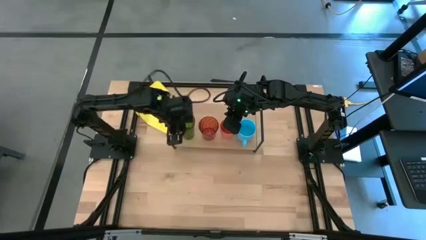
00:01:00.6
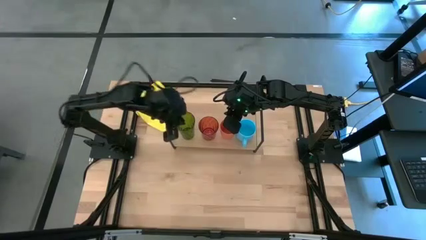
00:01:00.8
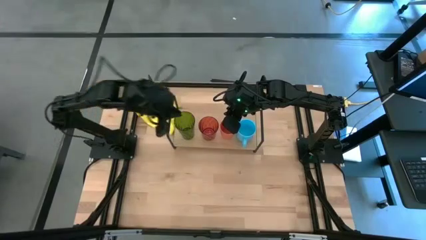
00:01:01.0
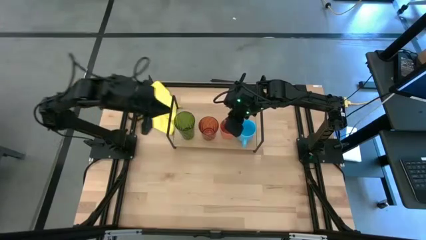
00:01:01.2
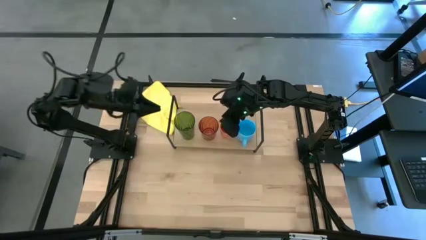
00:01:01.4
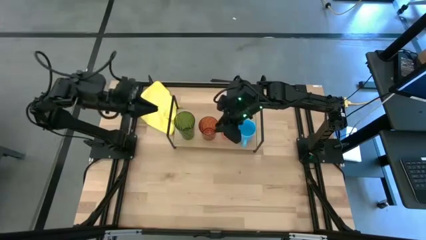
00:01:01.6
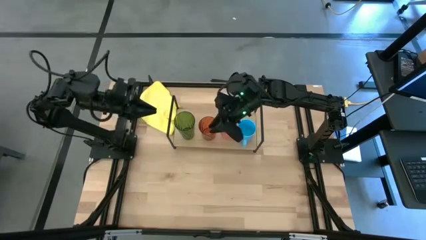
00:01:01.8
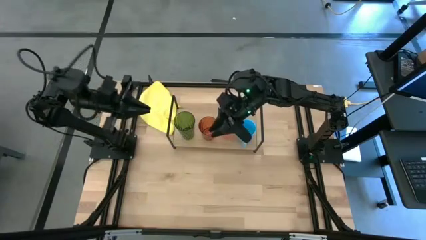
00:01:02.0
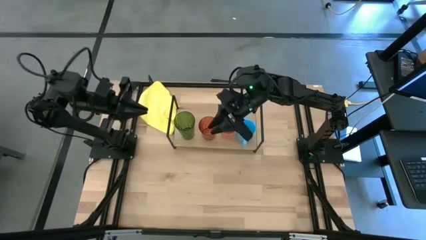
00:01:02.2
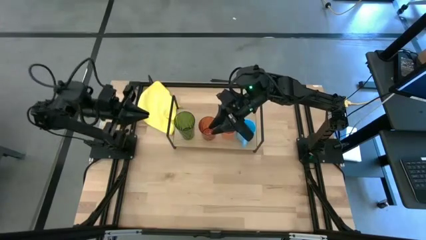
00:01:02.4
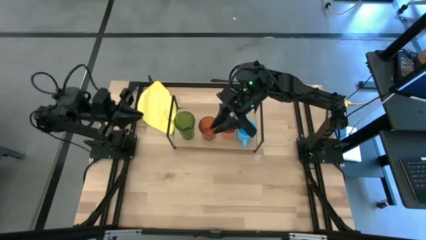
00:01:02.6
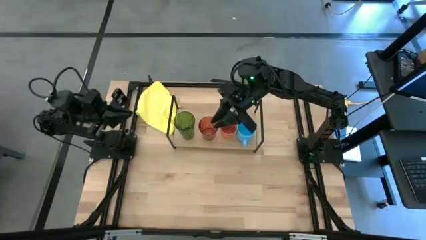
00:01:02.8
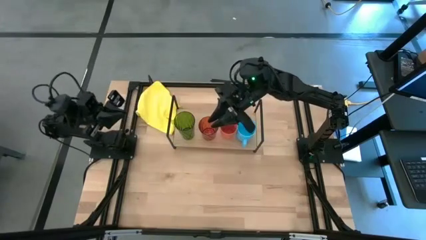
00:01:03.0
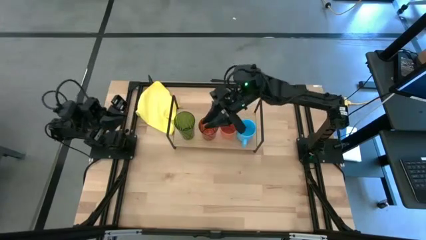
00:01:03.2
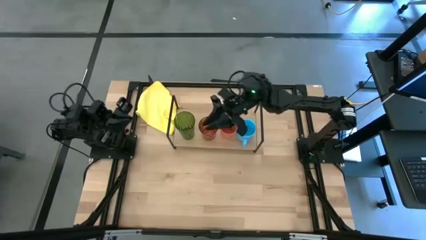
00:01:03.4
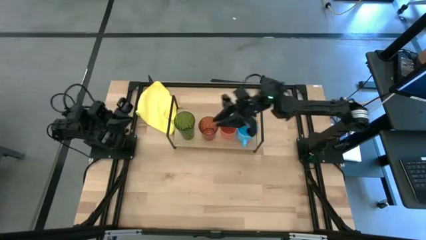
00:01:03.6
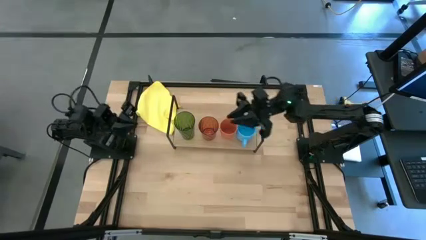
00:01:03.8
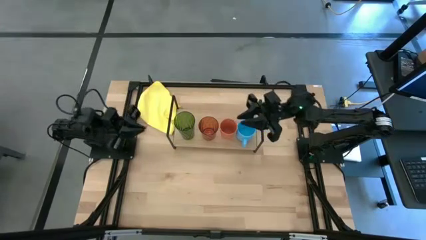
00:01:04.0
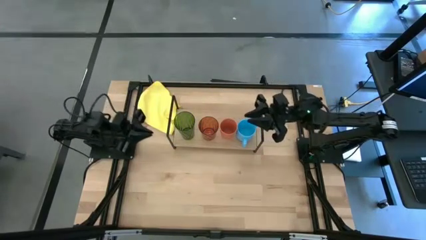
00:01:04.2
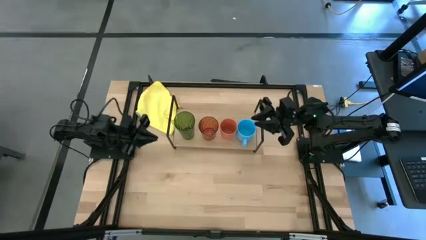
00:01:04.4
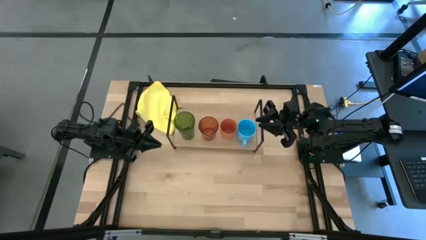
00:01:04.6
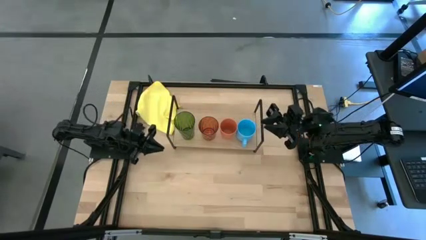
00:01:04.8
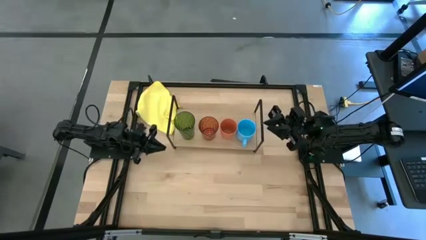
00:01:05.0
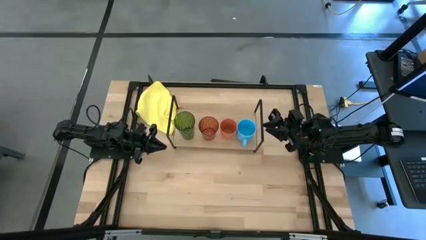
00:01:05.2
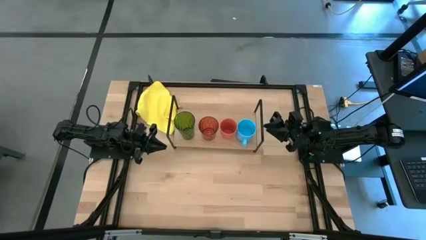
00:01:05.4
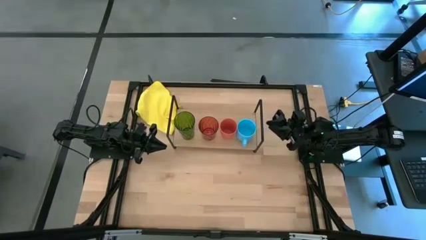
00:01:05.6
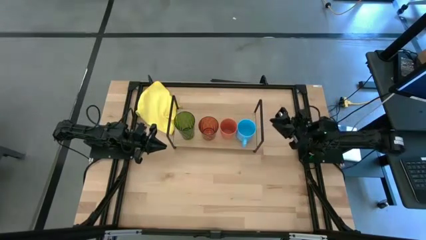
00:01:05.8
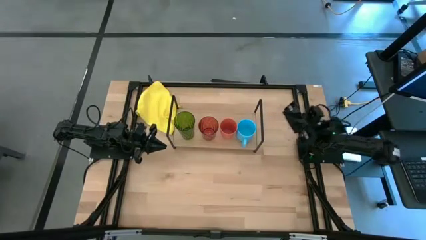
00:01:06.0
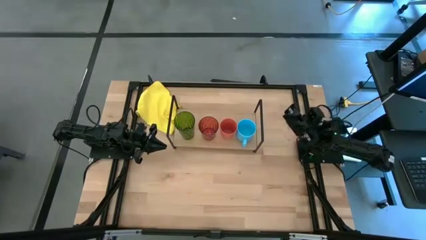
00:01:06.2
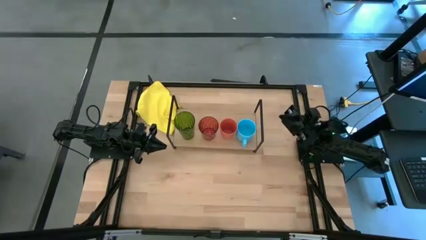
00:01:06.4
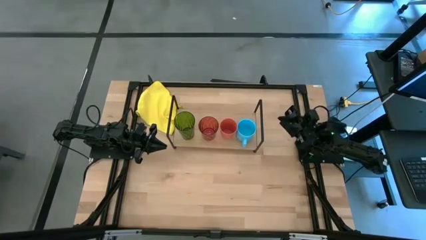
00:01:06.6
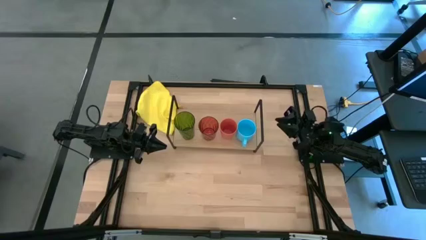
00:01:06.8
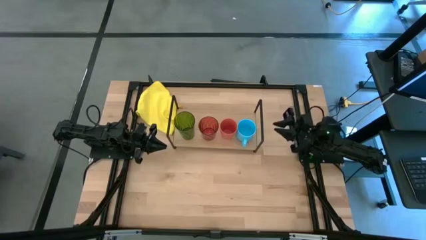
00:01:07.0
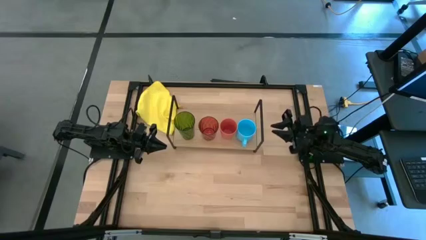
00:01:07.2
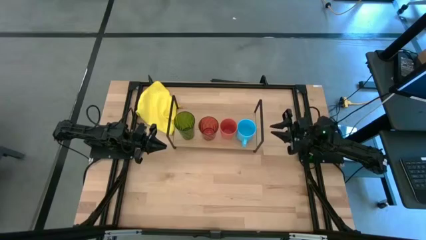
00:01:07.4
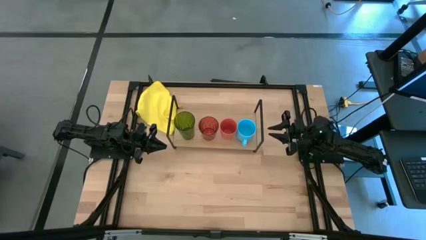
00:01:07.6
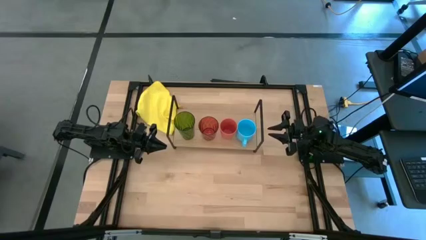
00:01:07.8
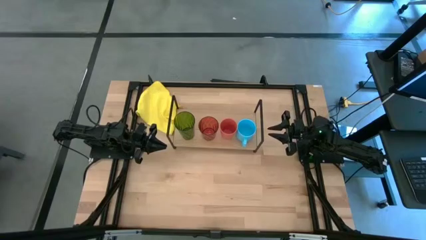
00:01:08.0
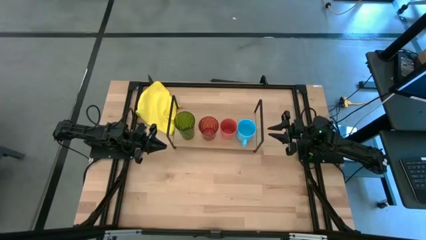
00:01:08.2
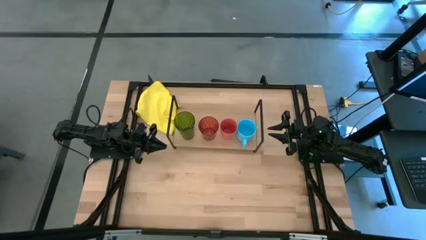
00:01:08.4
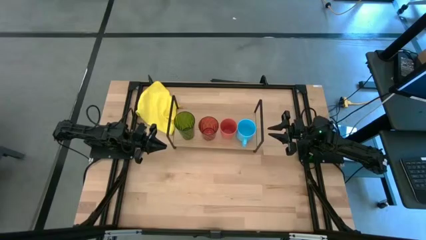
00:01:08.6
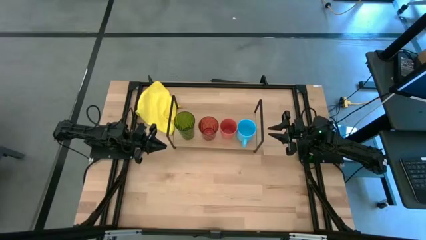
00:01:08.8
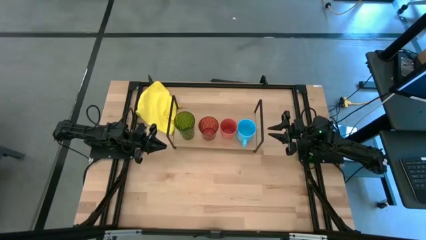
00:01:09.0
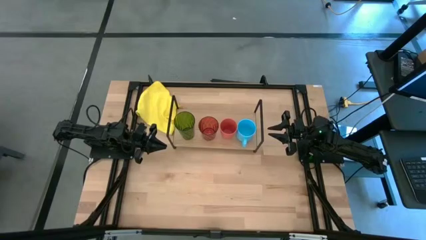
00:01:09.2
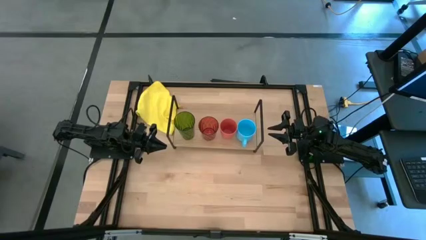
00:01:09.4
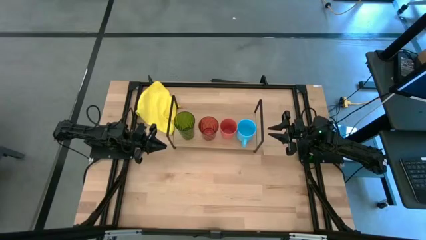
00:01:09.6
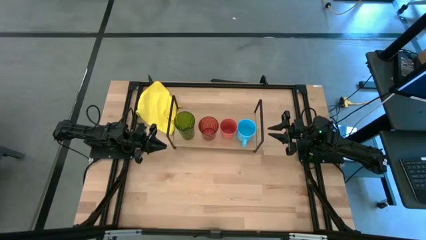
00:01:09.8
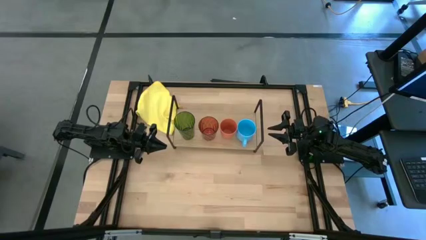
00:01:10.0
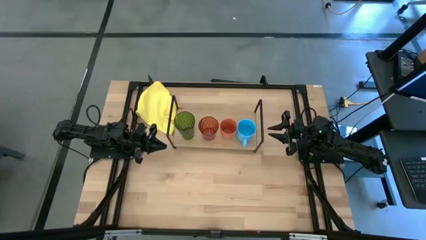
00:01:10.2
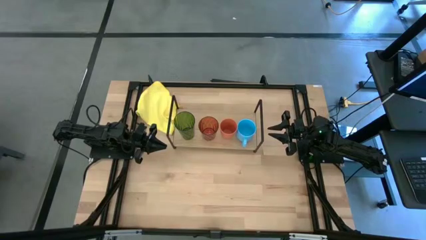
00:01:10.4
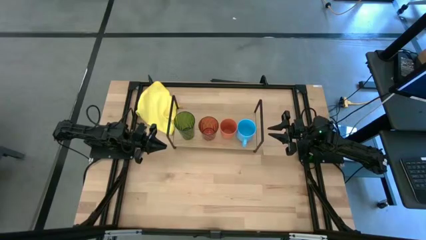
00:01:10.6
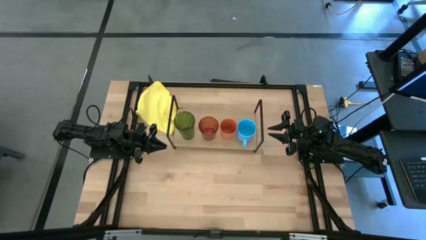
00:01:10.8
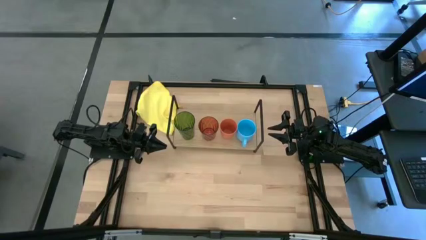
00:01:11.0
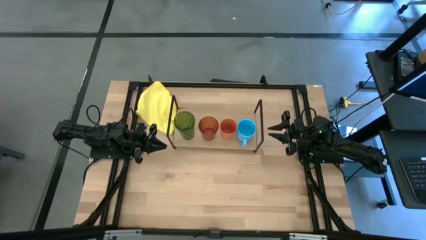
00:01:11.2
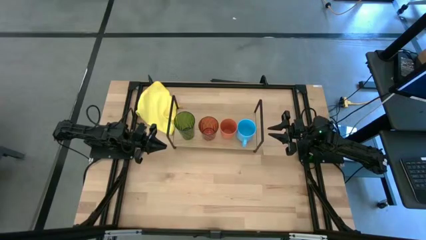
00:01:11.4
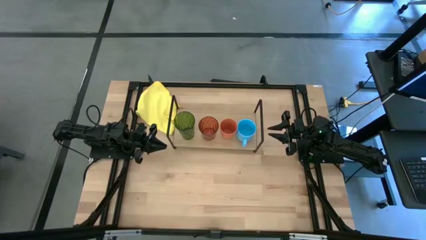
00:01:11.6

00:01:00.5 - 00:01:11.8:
Task: Stack small to large cups/mugs on shelf
Return to Home Position

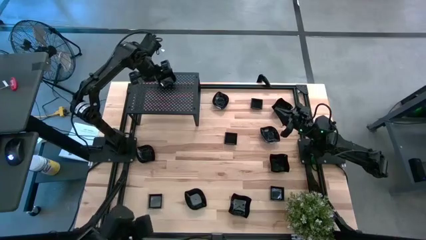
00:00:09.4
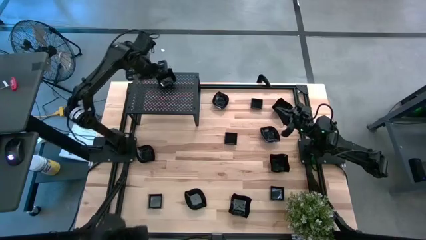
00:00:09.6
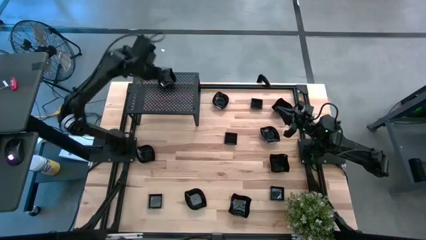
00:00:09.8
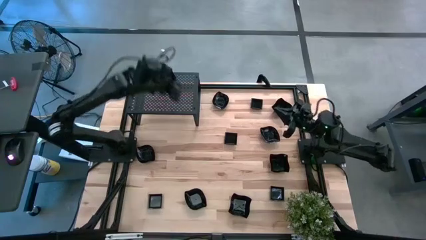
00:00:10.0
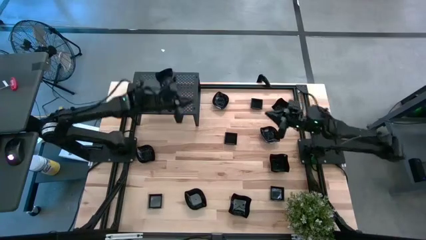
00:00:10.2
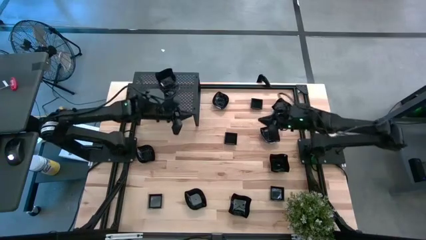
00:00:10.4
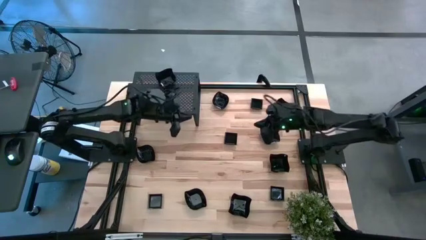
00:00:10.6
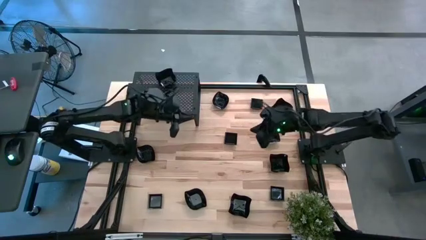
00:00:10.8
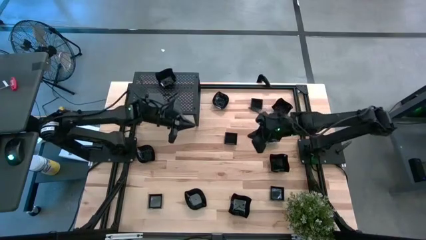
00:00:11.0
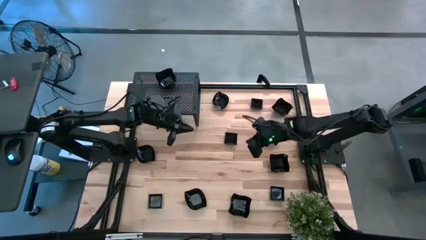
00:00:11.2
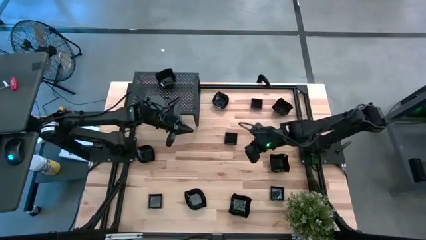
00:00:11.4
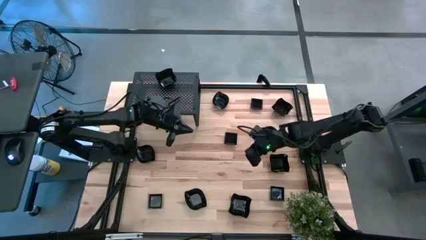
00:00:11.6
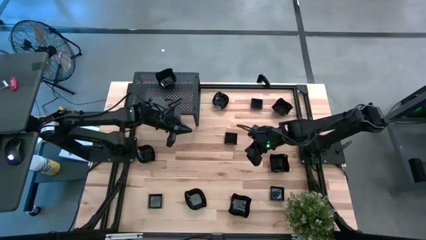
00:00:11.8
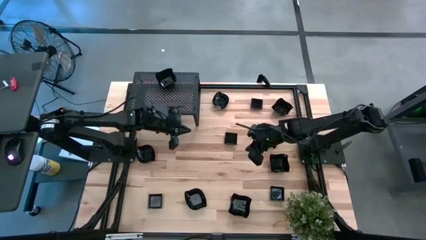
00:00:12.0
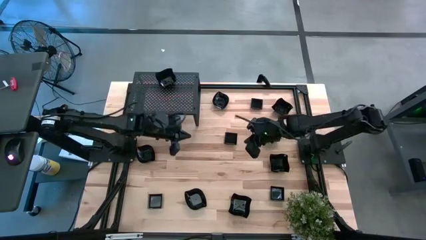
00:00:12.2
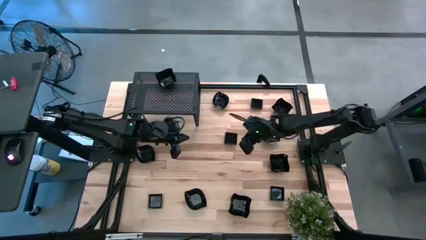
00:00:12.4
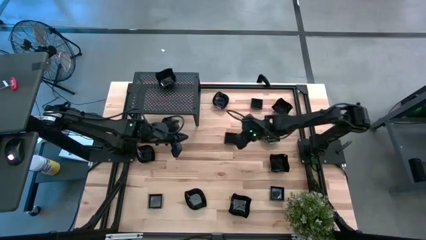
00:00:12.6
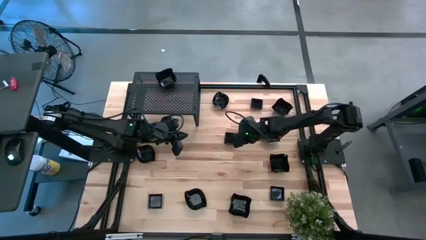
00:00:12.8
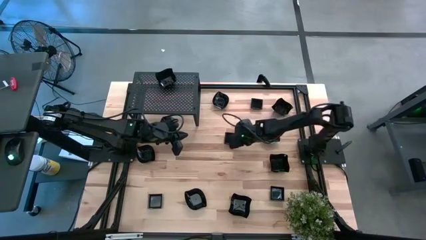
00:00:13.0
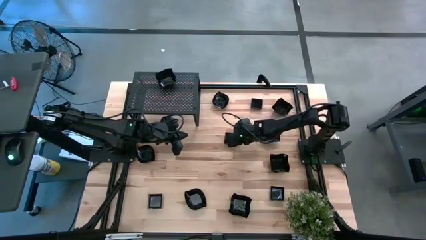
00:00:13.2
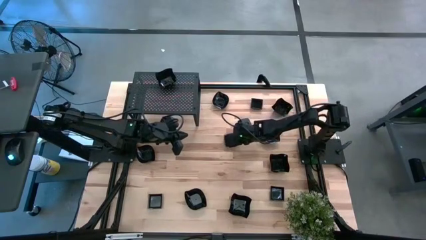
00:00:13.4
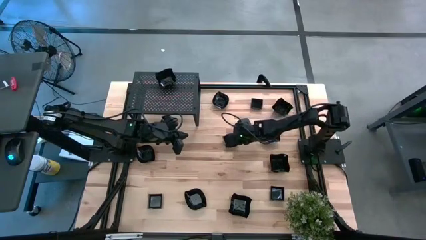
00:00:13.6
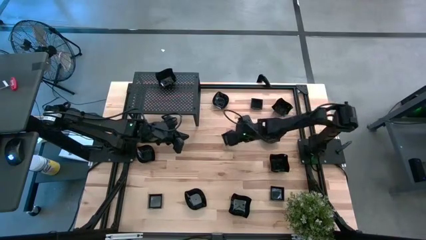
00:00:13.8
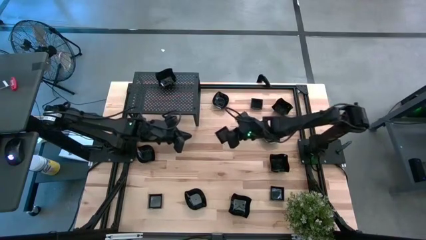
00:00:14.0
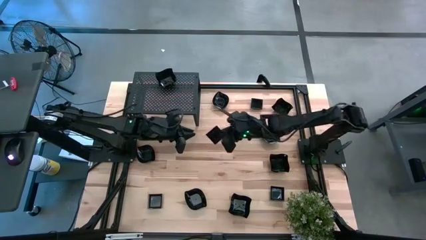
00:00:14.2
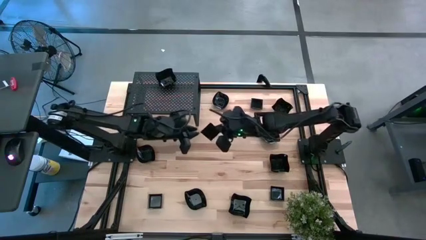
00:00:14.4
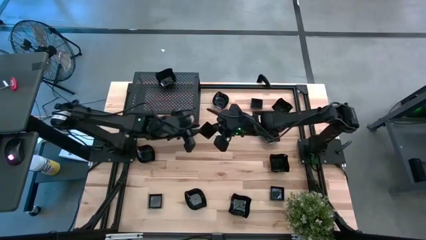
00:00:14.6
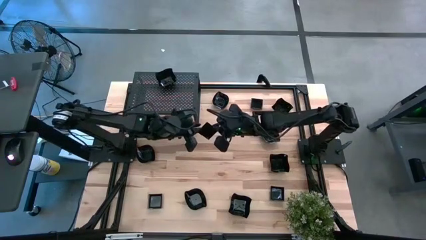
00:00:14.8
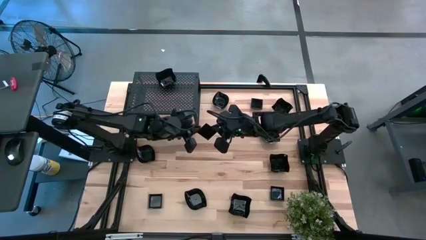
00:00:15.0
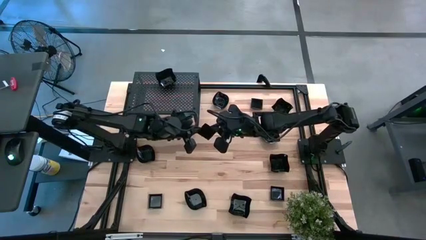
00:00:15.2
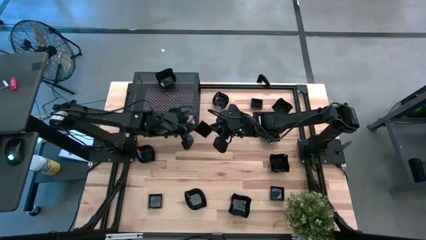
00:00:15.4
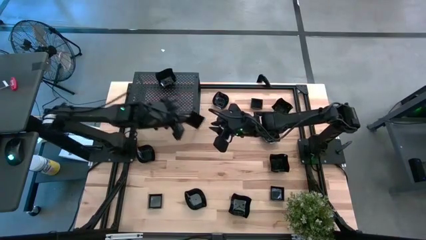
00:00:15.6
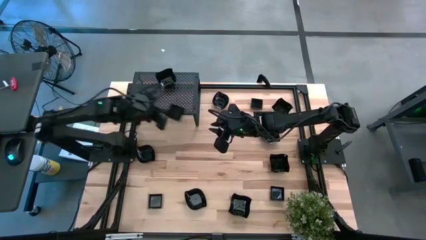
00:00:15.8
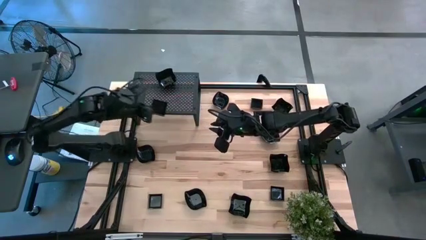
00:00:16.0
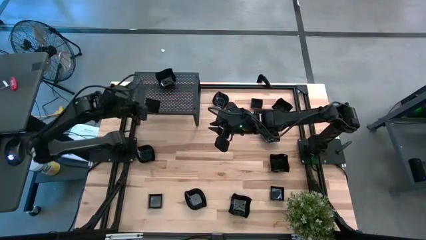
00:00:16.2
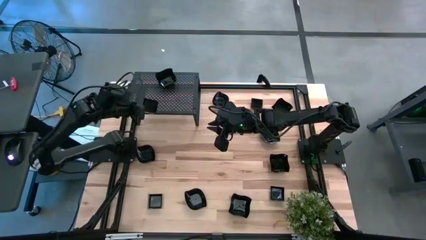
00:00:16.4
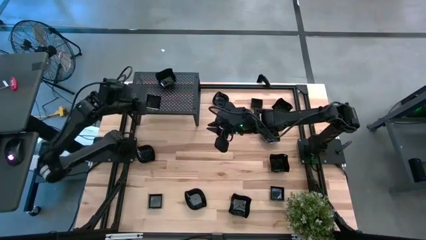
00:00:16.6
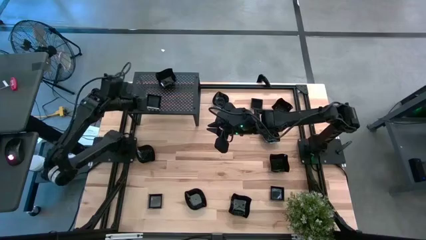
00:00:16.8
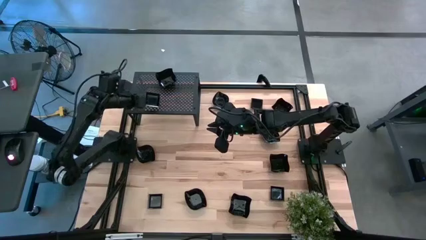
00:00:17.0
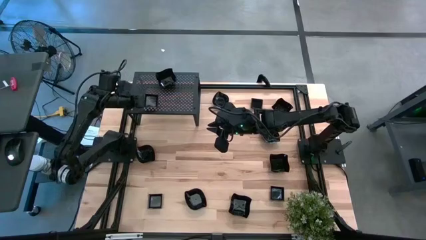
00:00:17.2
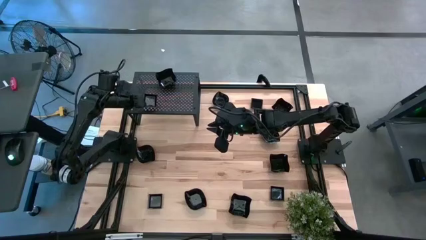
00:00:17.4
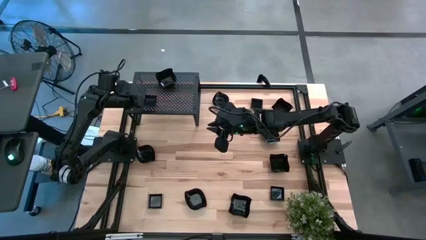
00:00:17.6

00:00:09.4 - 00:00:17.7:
Task: Pick & Place Mini shaped plates
Put the black square plate on the shelf
